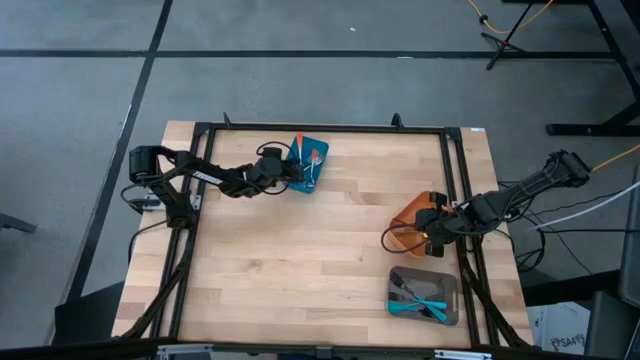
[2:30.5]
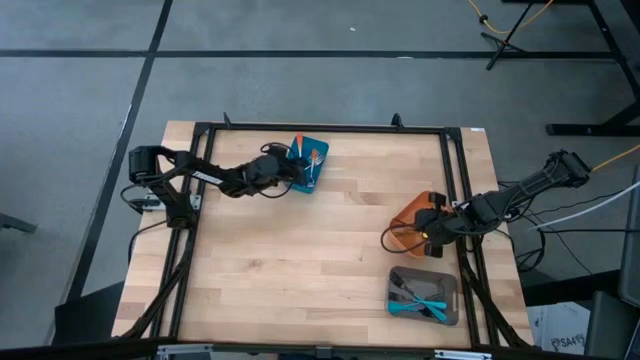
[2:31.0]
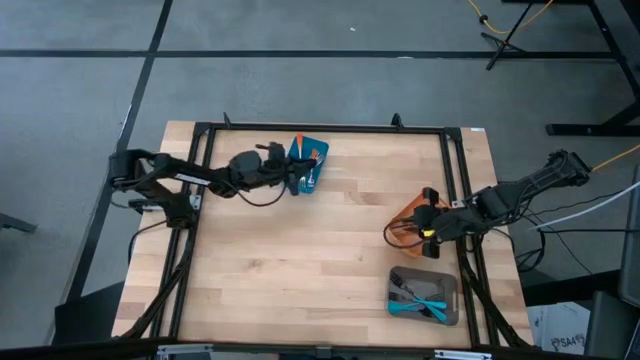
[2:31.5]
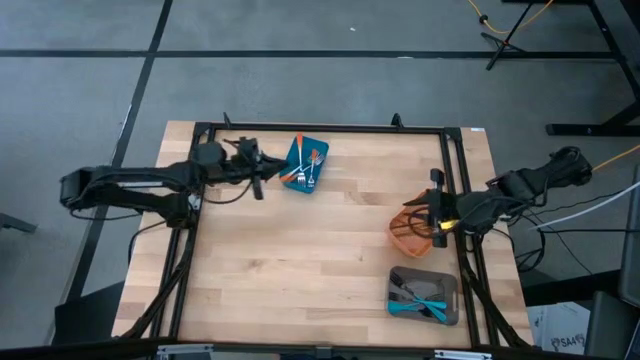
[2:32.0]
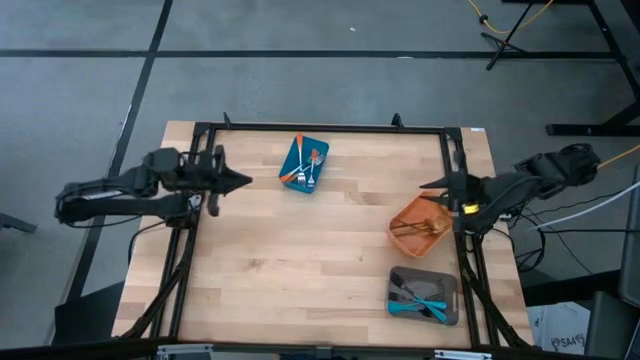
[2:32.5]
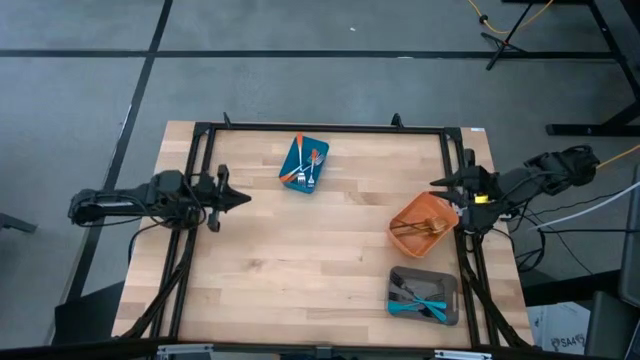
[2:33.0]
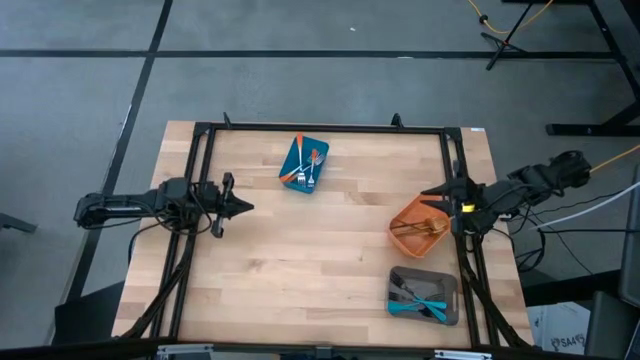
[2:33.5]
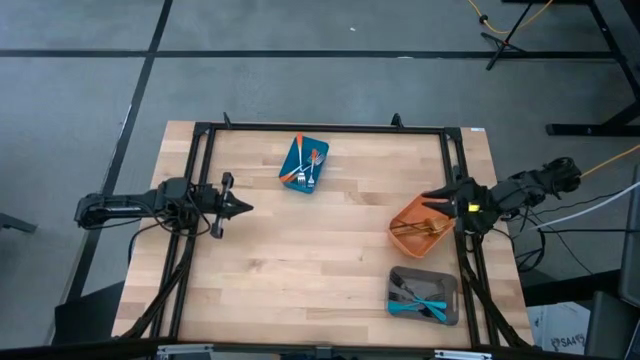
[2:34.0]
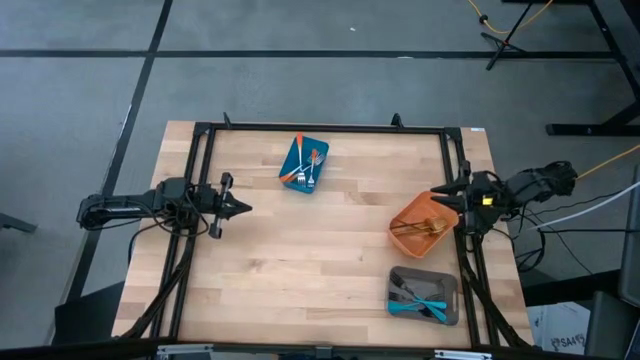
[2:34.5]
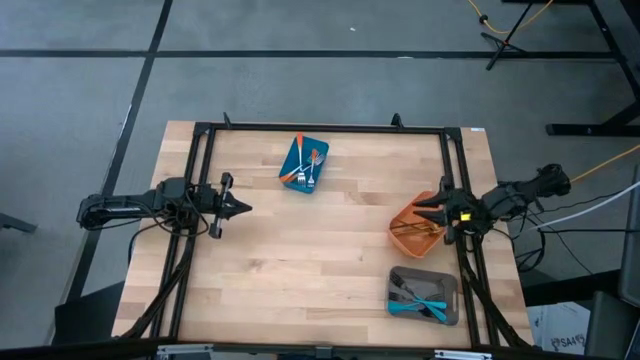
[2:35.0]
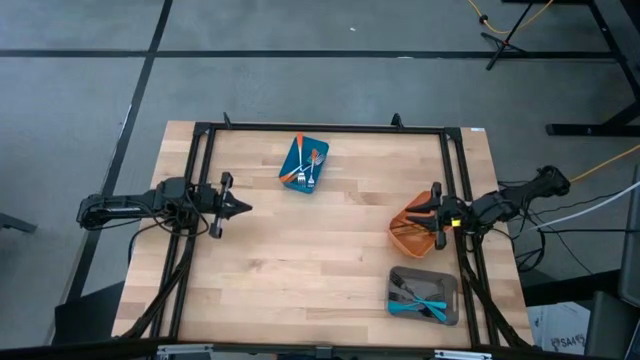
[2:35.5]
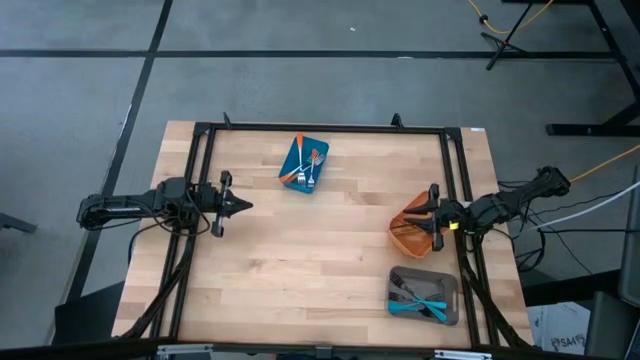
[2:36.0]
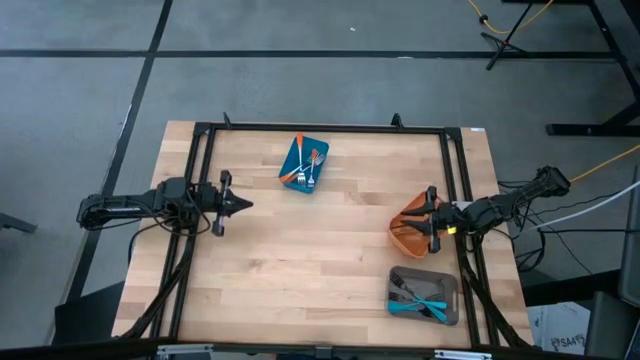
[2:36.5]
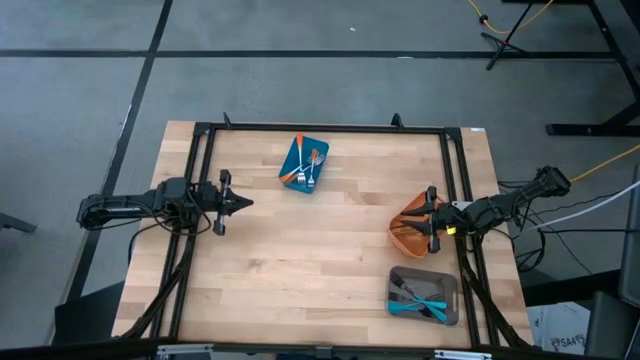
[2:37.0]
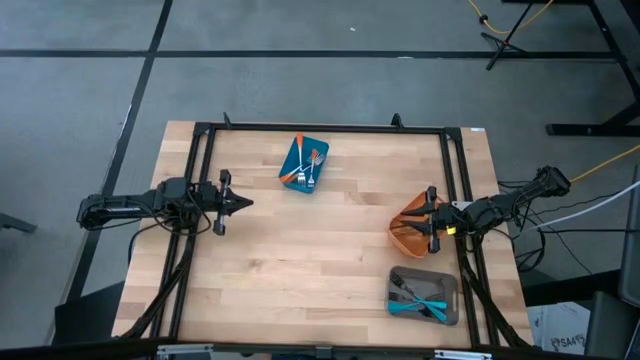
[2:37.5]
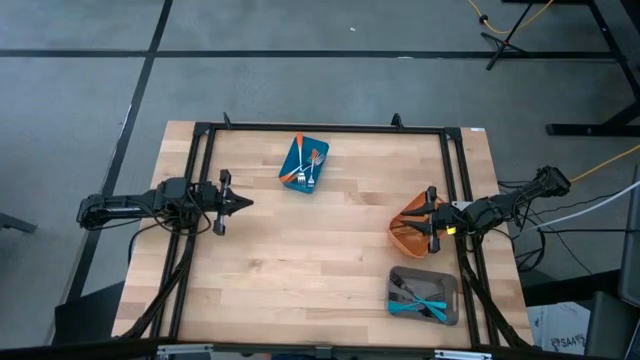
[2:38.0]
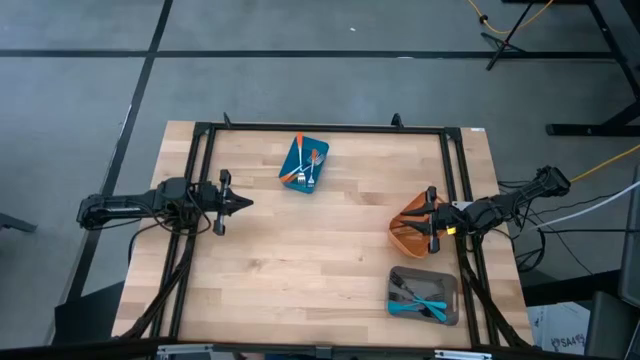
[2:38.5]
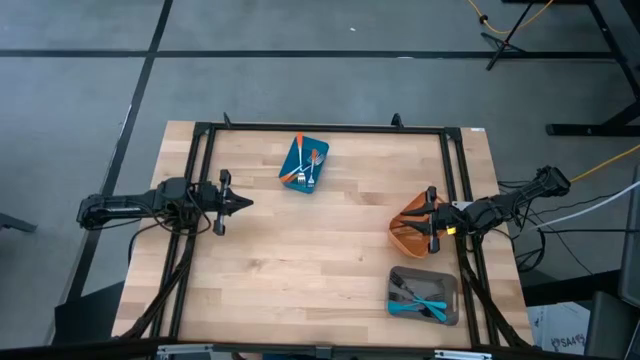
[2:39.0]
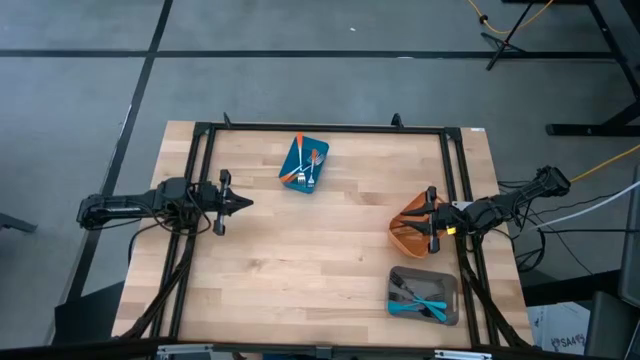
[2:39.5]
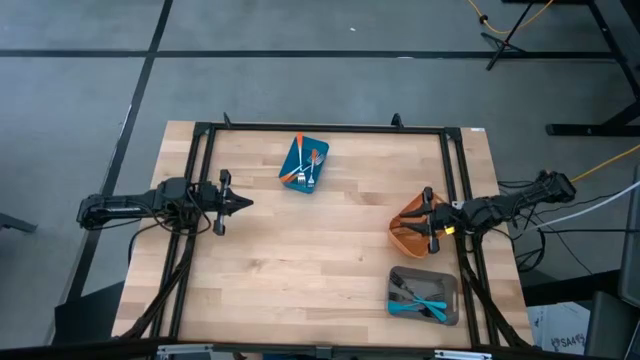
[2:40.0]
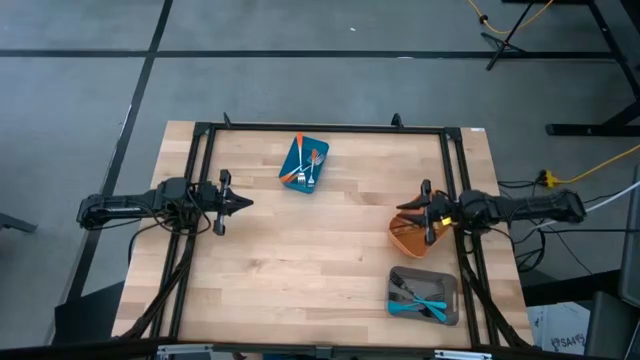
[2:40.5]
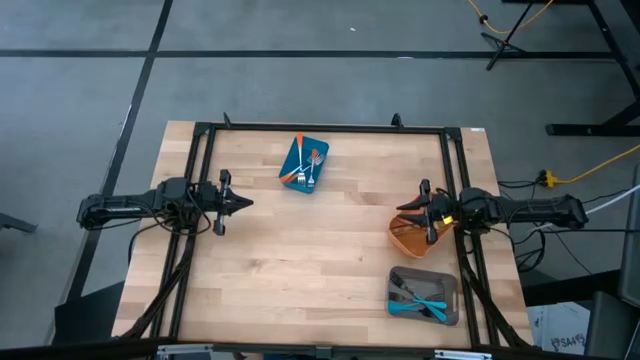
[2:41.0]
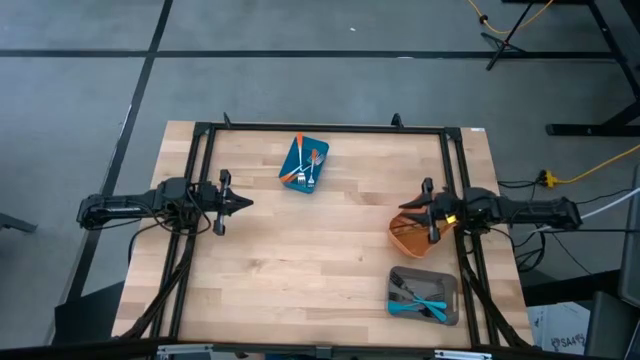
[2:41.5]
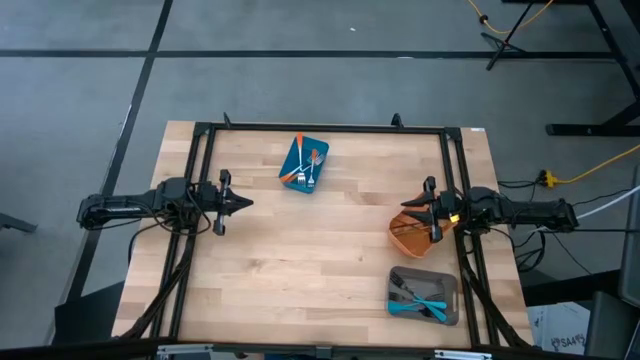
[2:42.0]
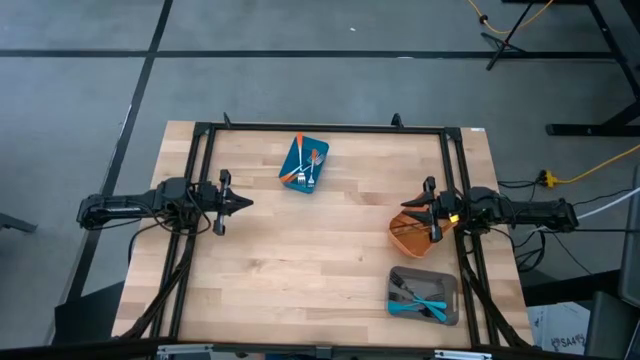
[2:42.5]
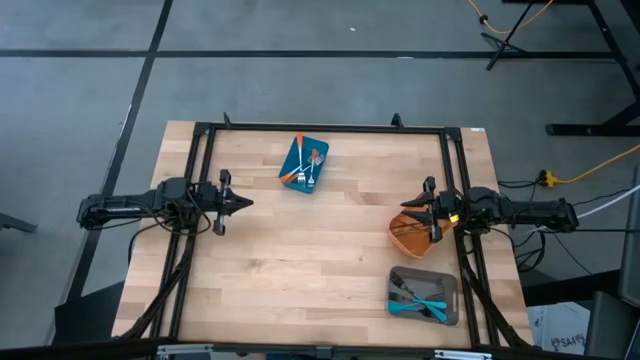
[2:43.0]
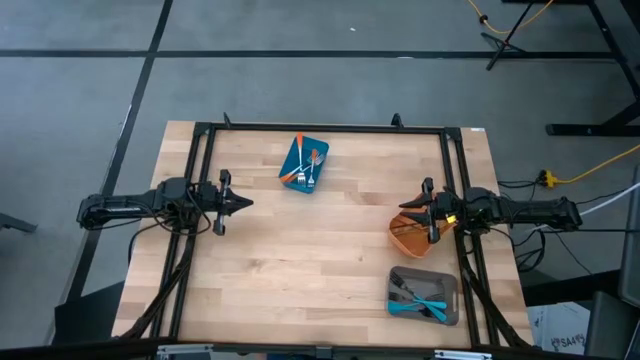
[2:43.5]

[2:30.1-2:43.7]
Task: Sort silverware by color (type)
Return to Home Position

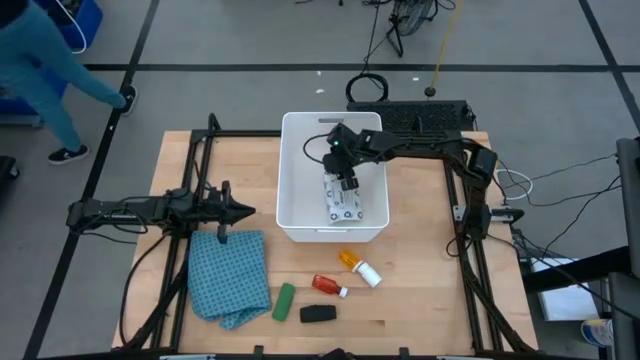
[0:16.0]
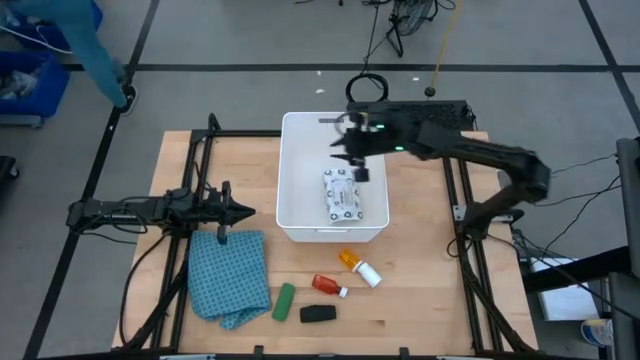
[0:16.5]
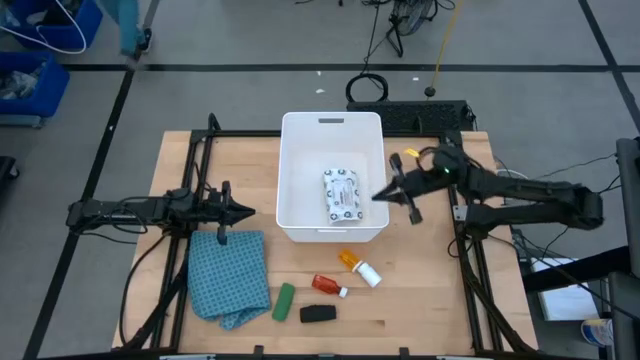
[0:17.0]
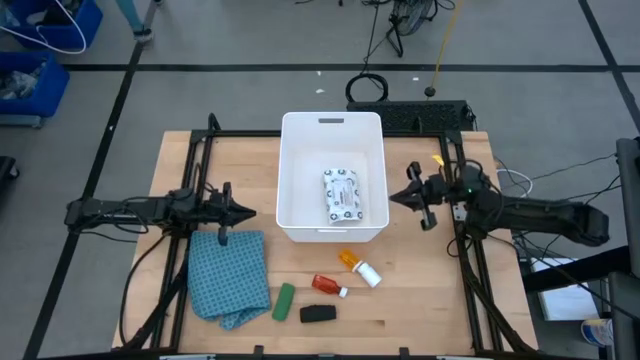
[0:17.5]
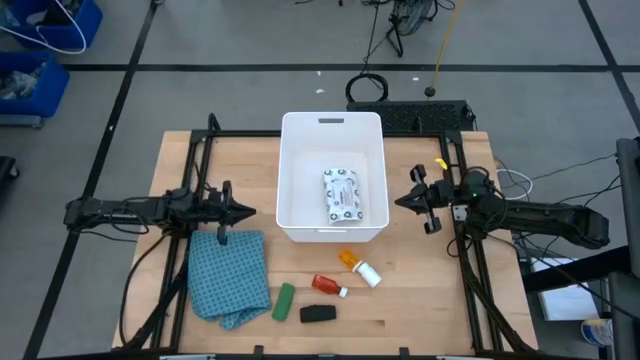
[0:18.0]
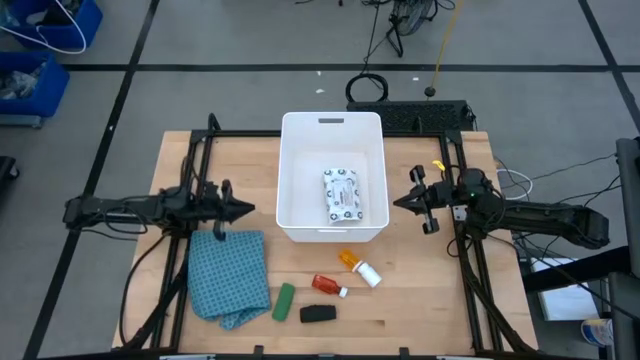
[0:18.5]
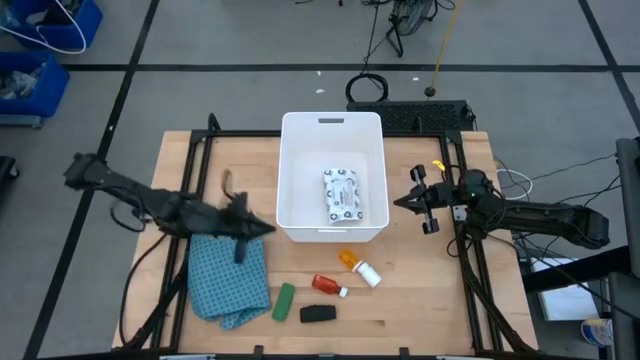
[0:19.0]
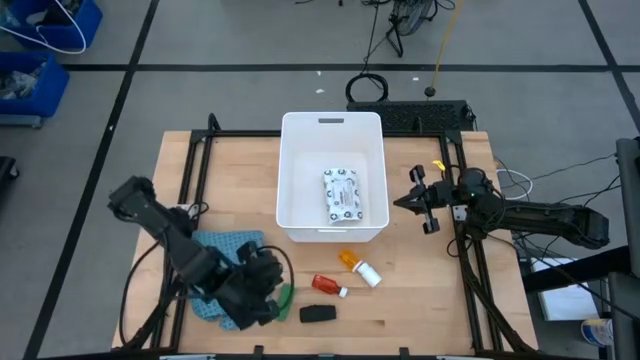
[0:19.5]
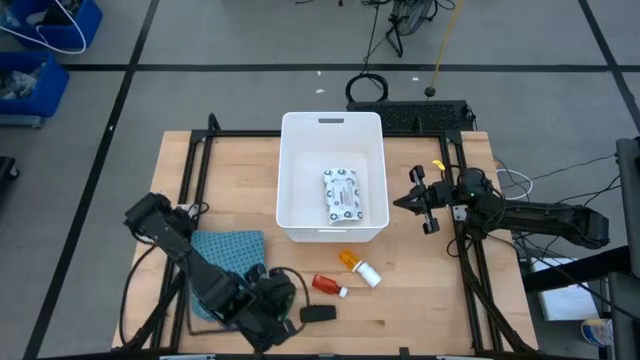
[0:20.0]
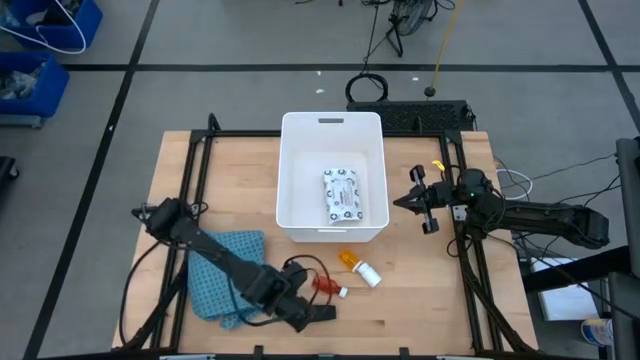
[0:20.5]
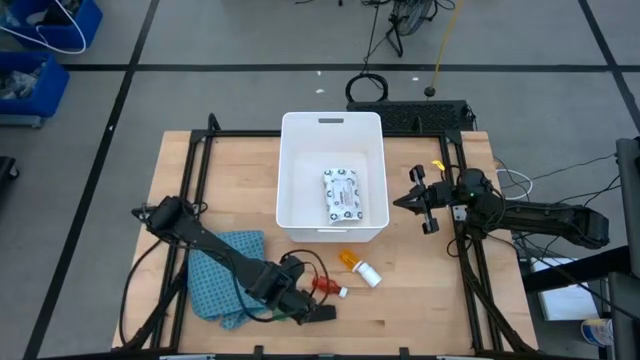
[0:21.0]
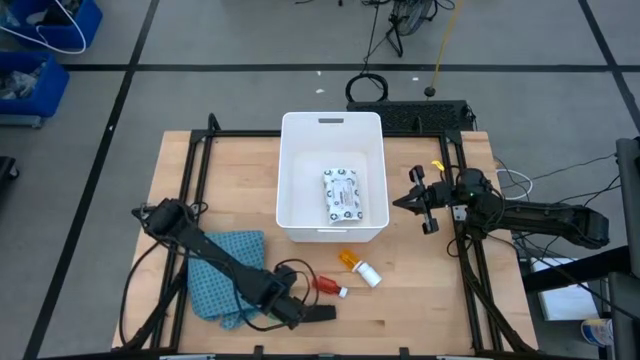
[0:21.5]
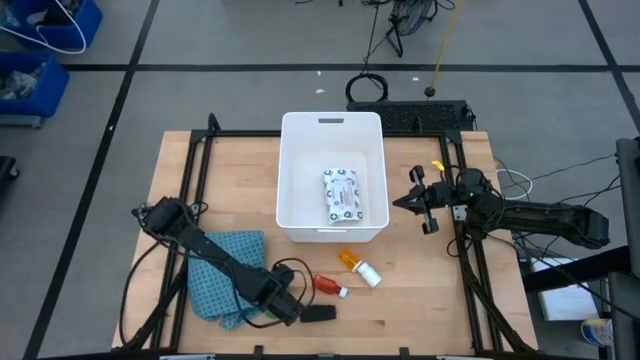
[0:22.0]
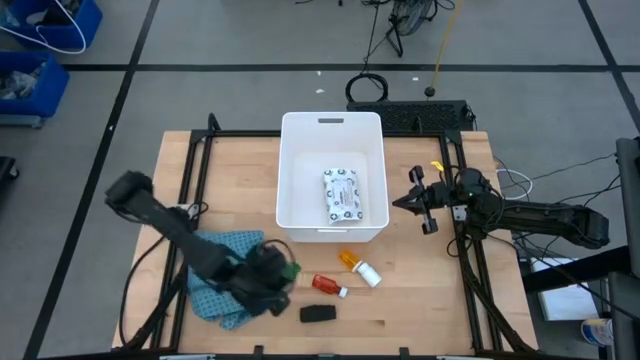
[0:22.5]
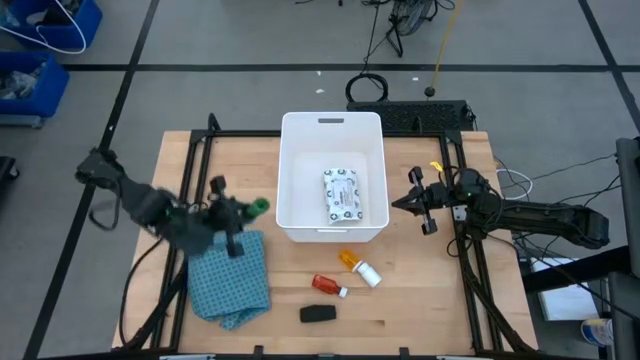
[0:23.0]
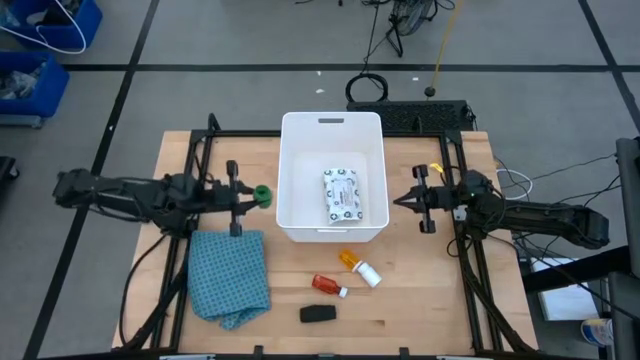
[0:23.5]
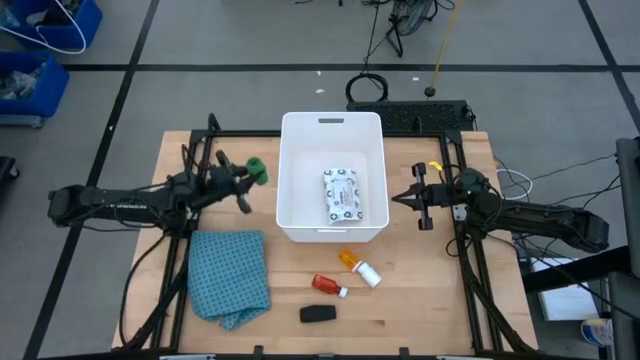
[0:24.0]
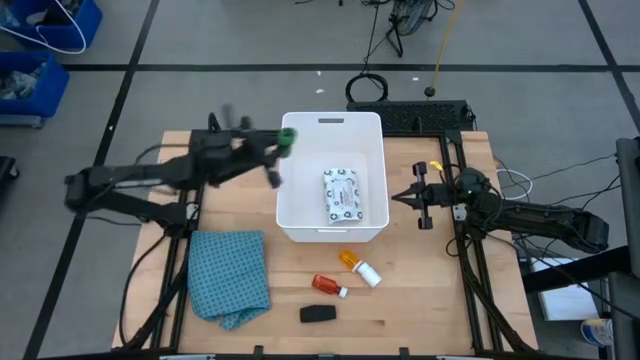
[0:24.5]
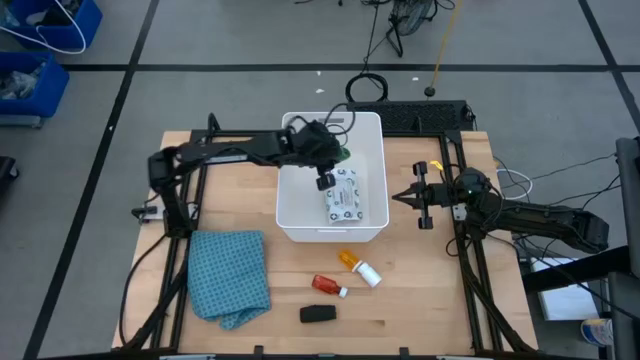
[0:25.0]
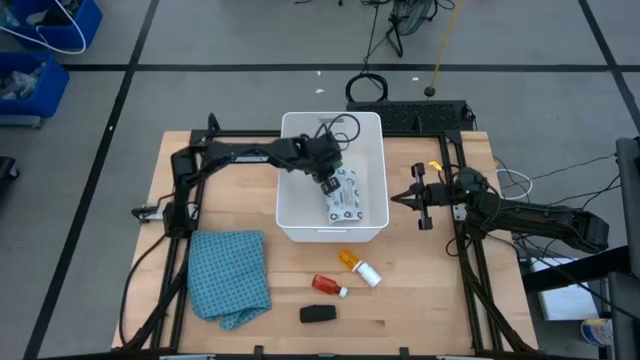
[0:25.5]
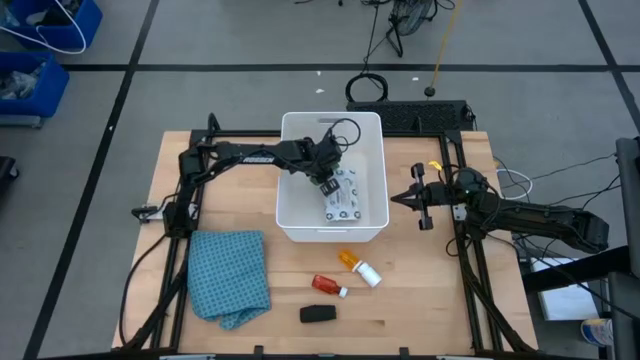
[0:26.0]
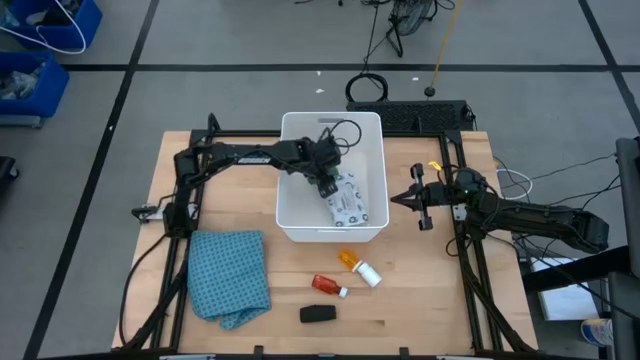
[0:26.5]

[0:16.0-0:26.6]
Task: Pick & place medical supplies in basket/bin
Put the green bandage into the white bin
